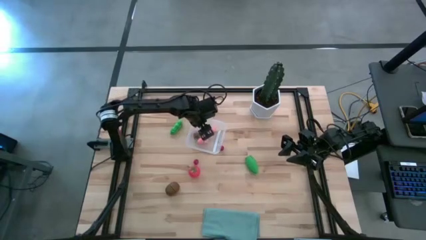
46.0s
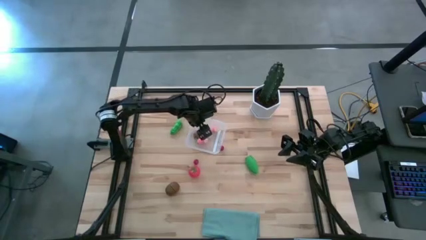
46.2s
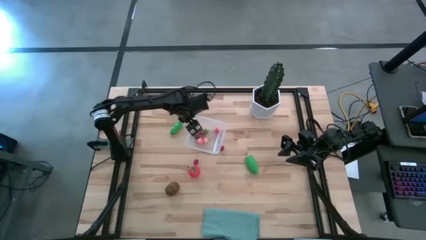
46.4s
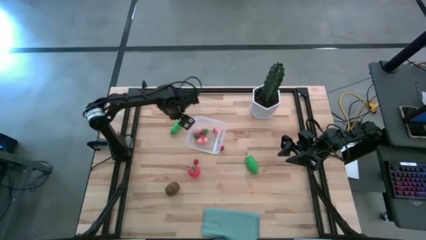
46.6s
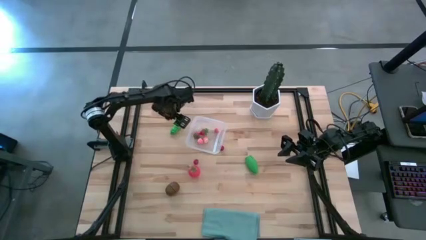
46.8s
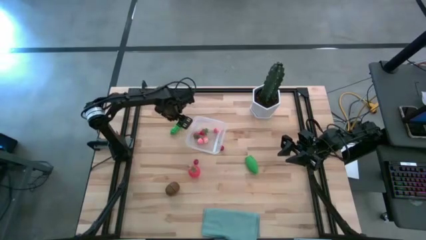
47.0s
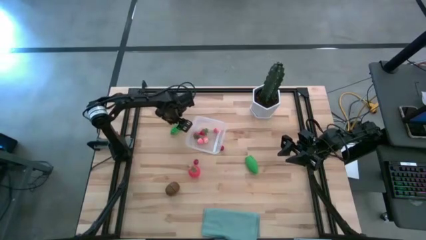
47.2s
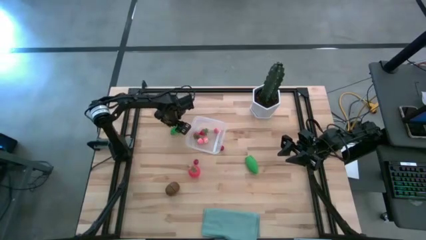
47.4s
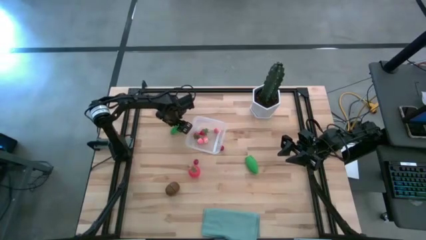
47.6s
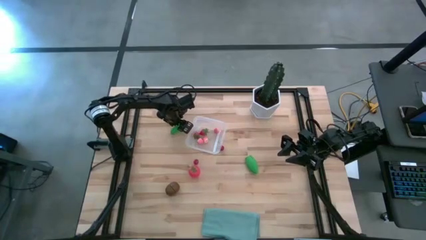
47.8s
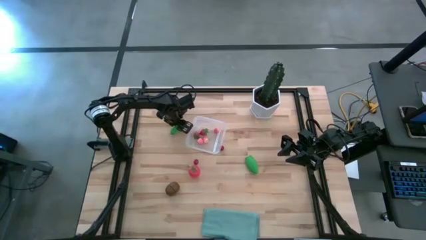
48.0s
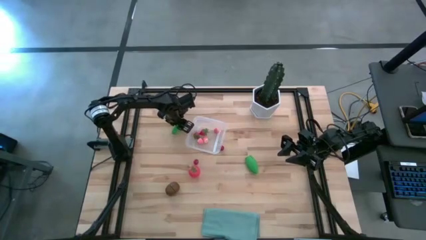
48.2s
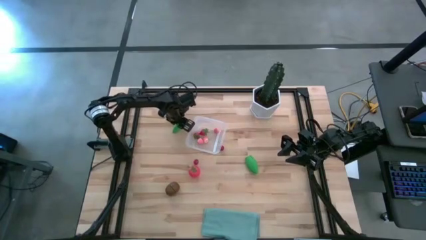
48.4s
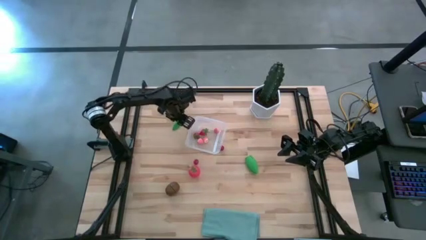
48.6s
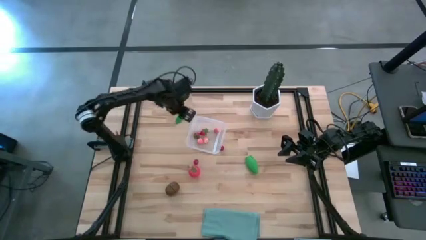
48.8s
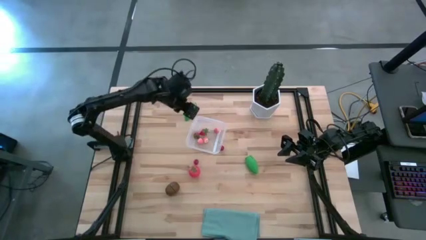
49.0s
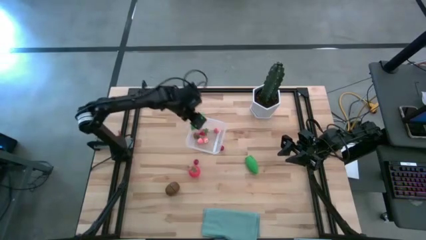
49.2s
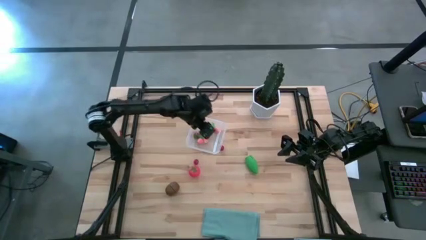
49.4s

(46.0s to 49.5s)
Task: Pick and placing Produce into tupperware
Put the green pea into the transparent bin

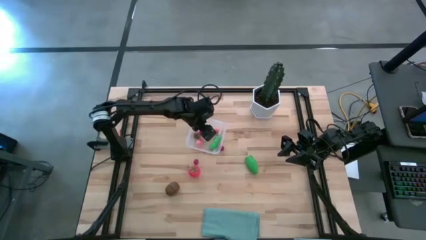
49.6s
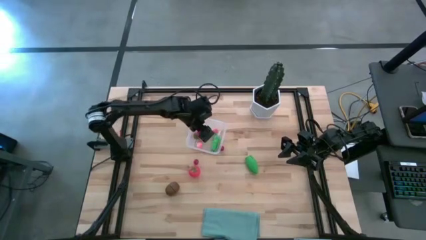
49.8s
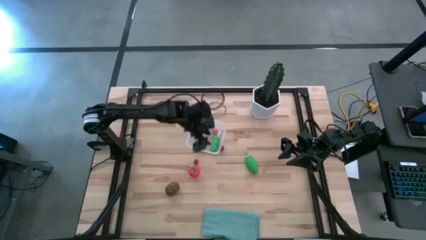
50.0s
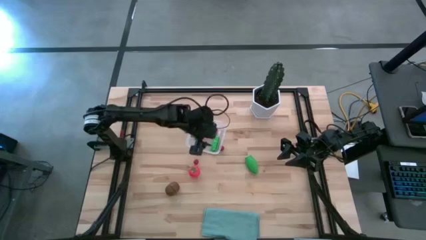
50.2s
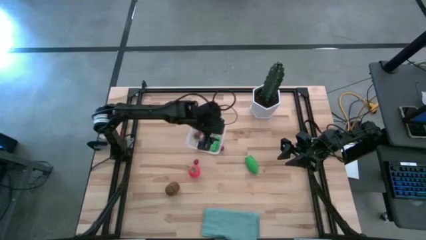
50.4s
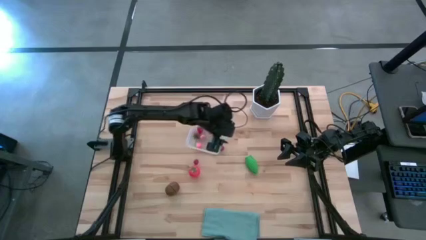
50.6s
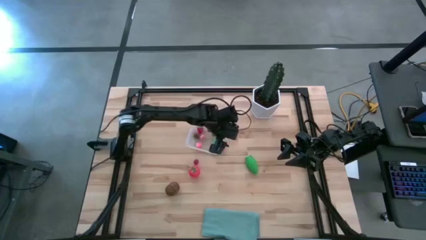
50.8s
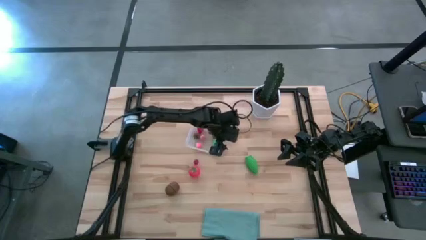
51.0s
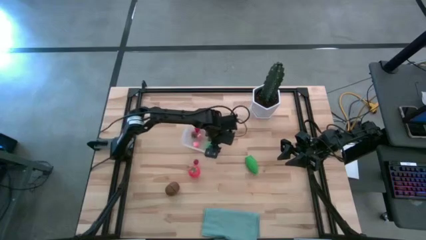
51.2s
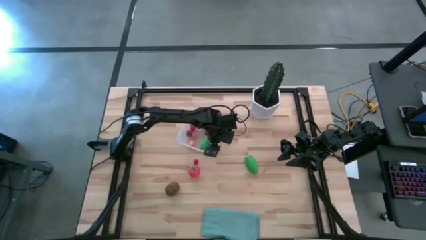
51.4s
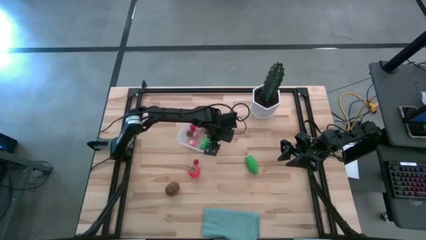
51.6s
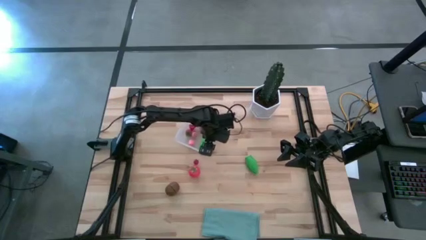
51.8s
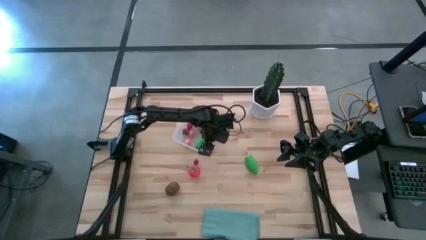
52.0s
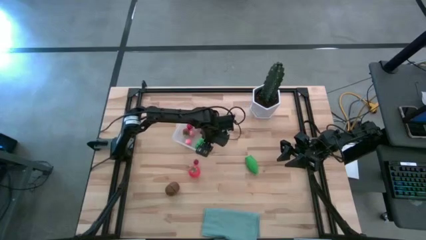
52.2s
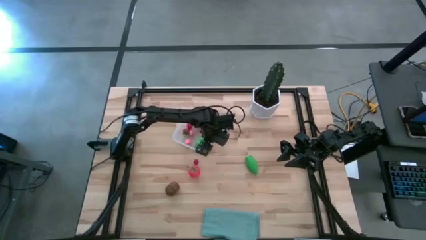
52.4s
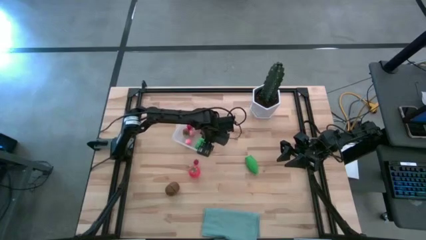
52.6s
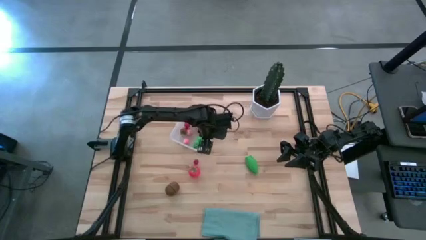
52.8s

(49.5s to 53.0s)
Adjust the transparent bin

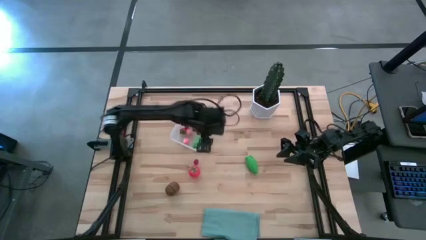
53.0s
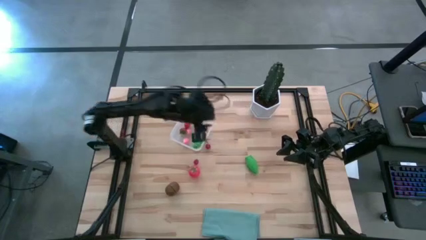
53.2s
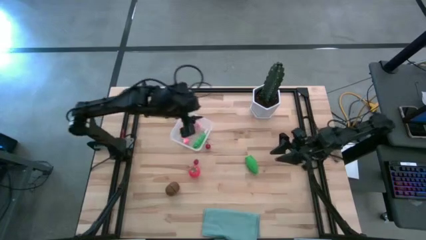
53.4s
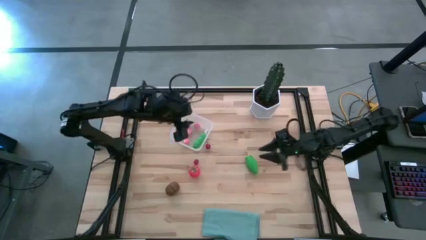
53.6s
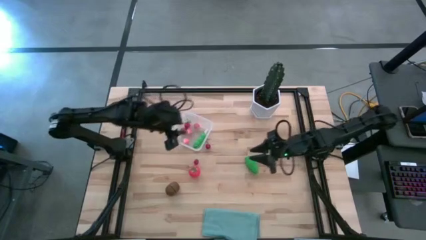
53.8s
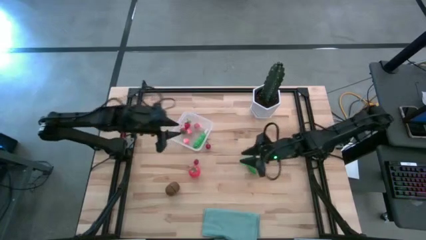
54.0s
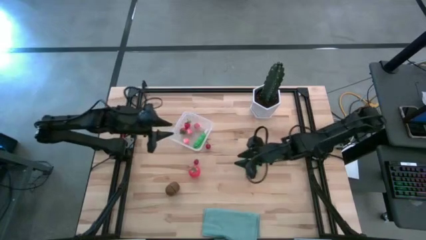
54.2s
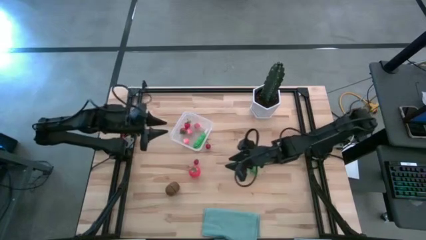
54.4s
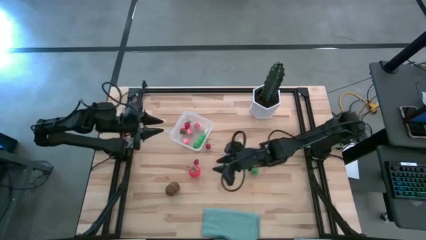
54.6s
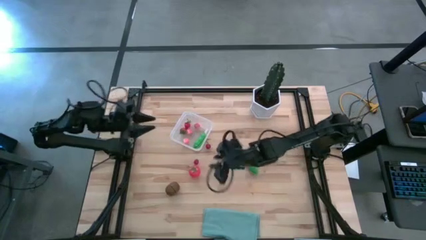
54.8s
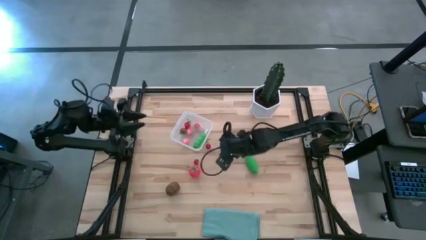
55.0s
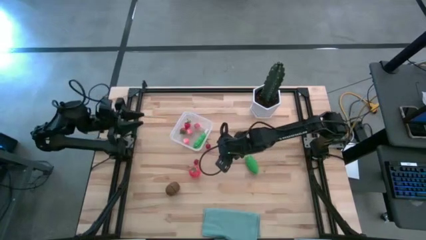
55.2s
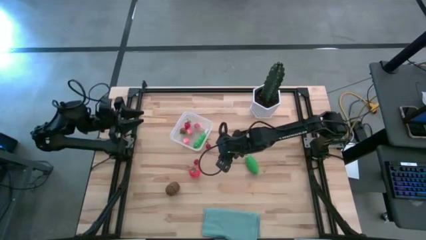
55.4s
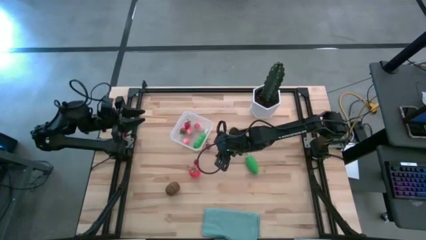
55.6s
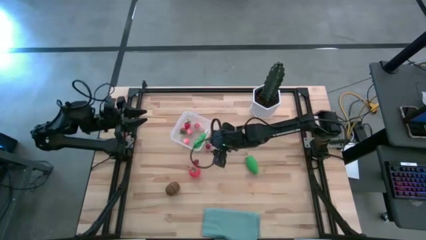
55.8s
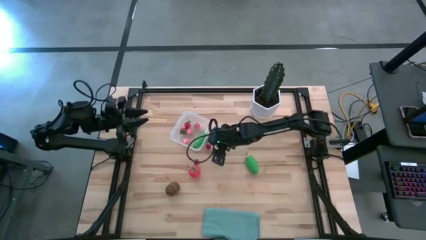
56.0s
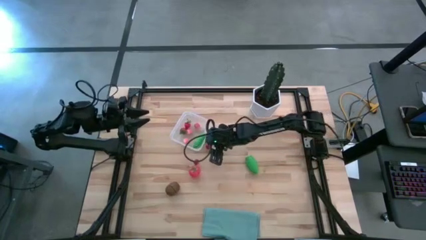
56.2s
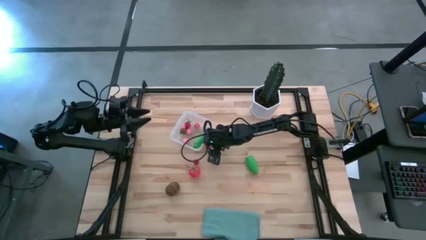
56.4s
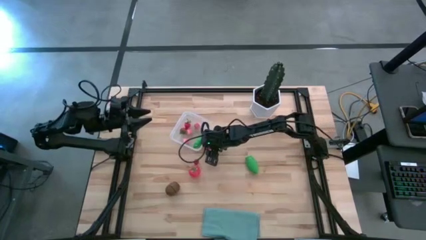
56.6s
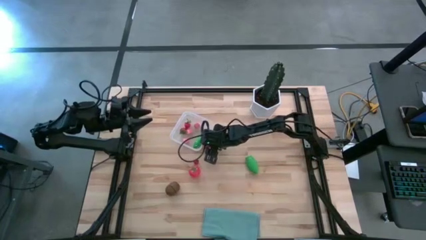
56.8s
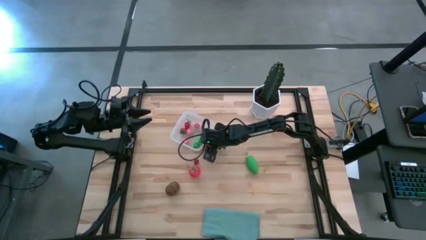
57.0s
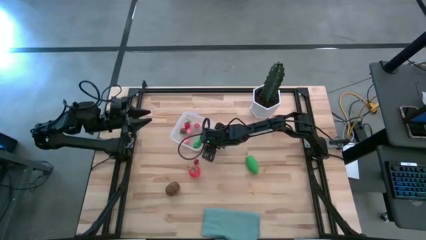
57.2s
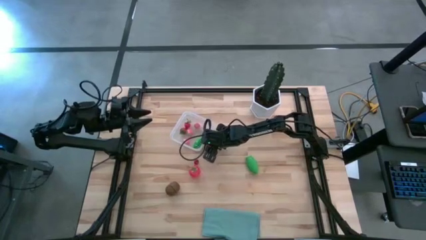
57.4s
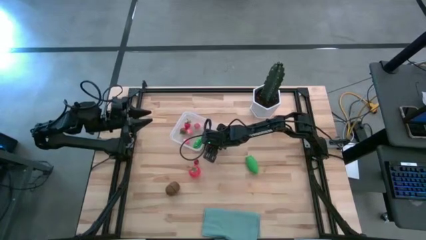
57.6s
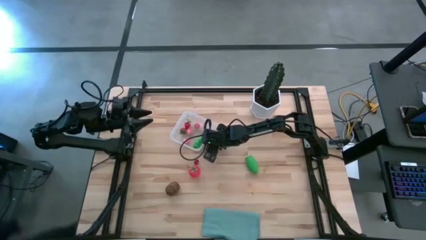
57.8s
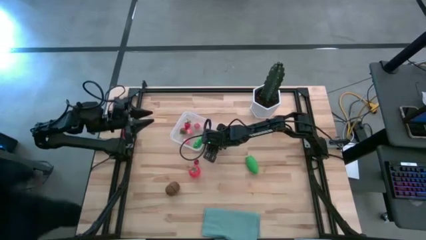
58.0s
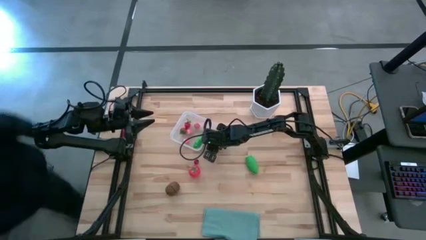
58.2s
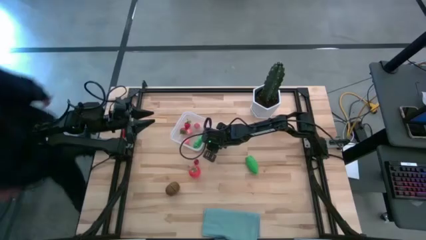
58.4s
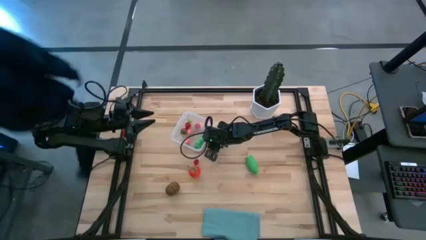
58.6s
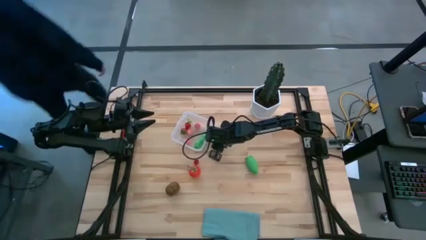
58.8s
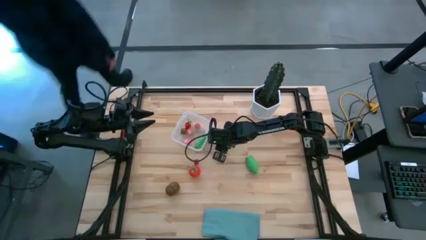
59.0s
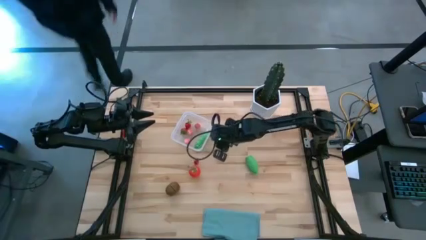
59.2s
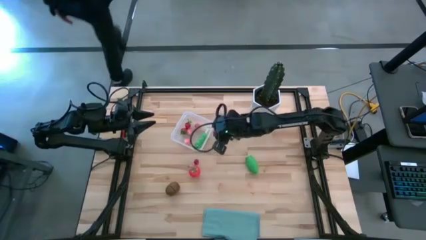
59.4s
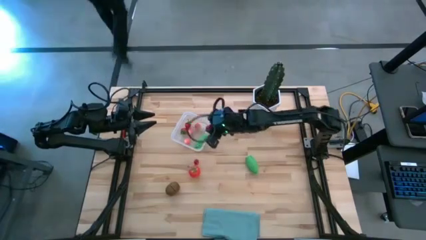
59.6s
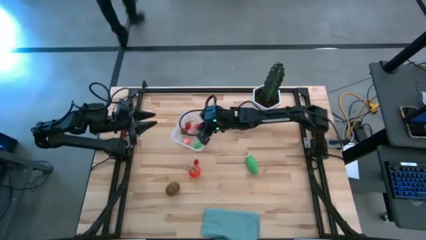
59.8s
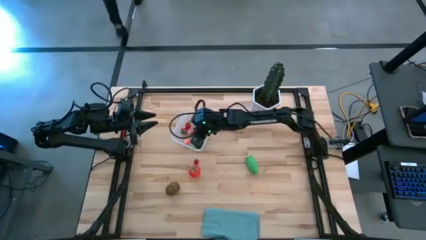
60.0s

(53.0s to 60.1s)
Put the right red cherry into the transparent bin

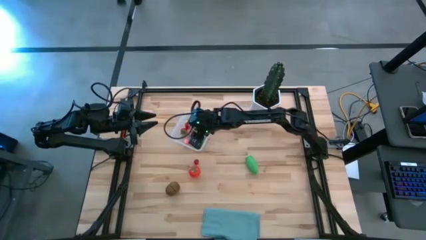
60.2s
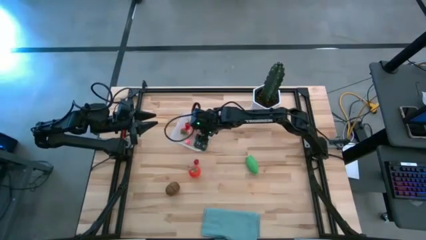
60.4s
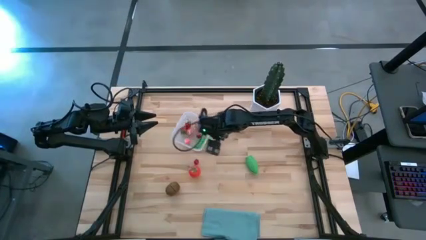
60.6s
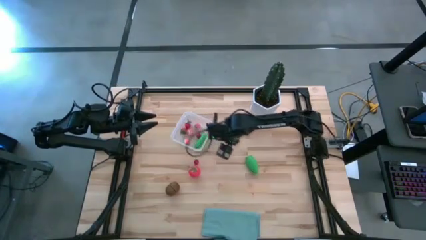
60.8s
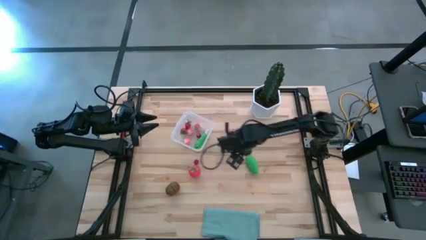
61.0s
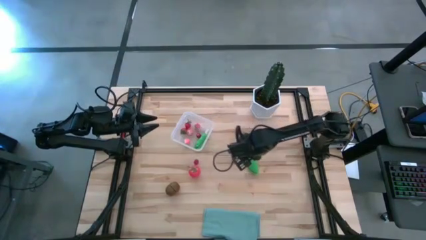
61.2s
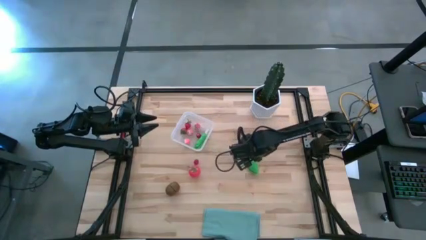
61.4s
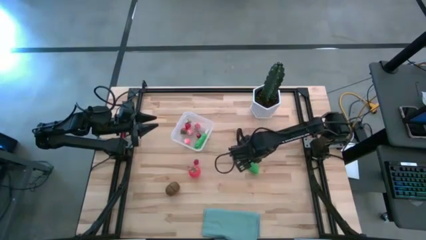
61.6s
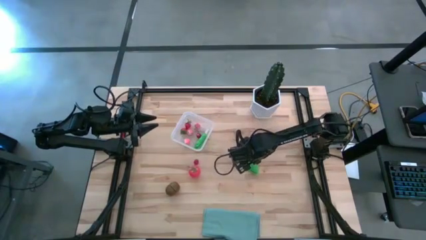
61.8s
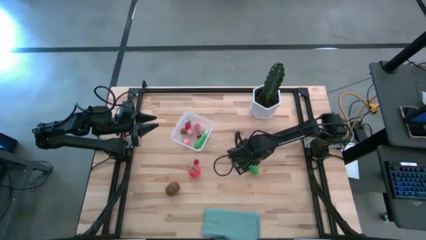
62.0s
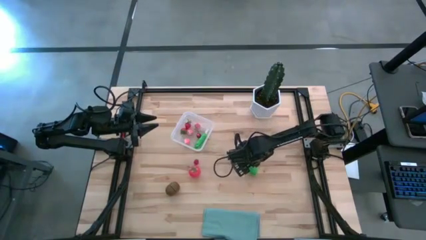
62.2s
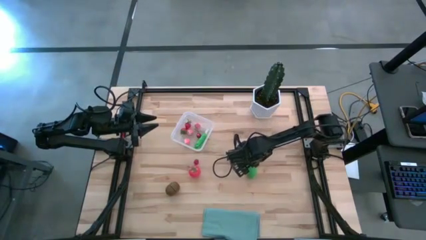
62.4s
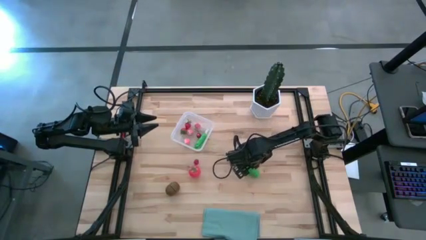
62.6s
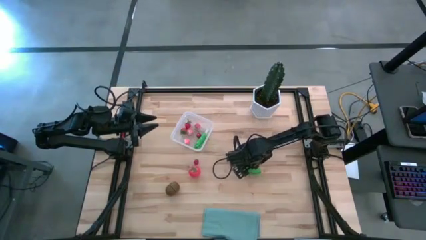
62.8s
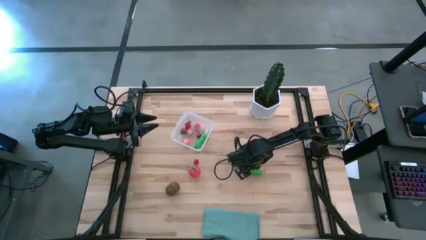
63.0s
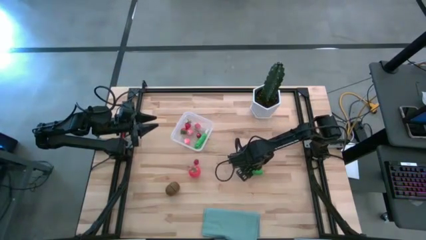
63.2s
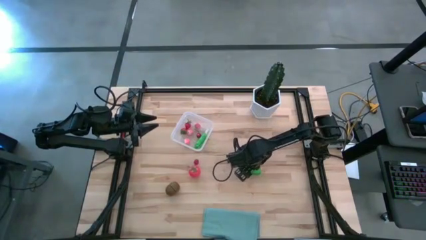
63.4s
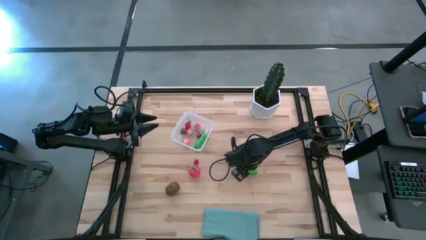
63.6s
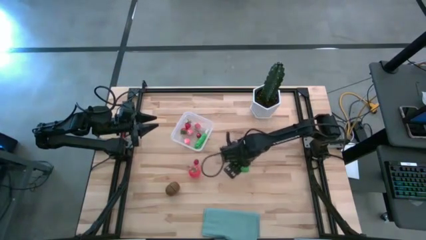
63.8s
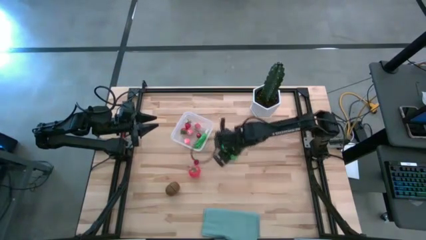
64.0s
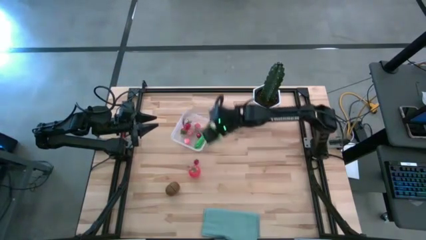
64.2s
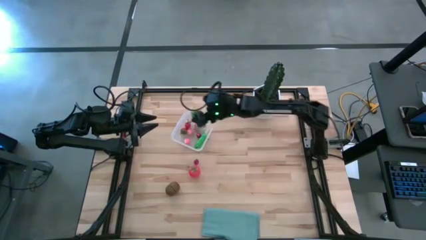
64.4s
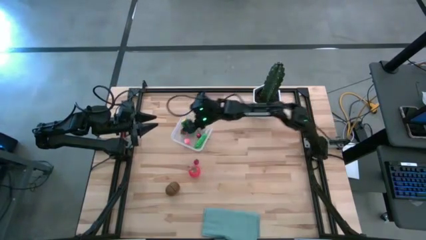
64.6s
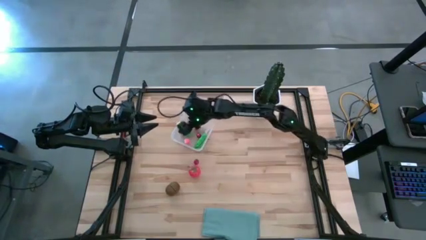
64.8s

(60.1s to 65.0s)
Put the green corn into the transparent bin
